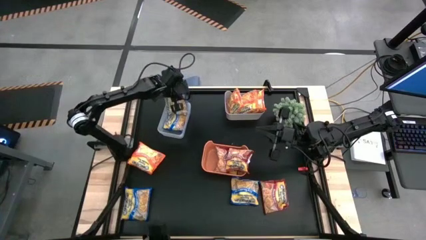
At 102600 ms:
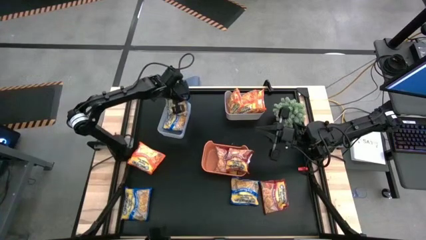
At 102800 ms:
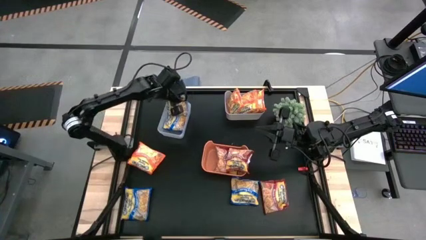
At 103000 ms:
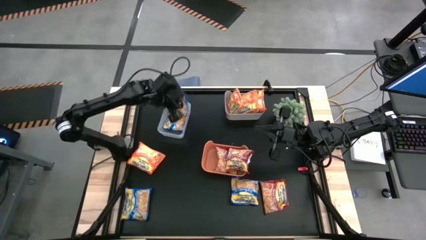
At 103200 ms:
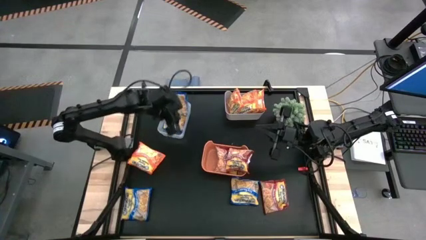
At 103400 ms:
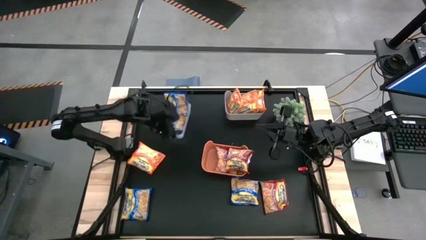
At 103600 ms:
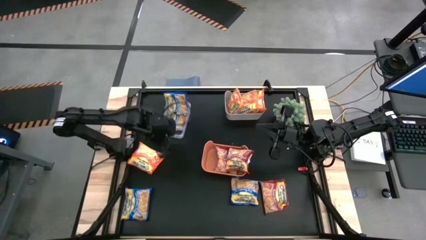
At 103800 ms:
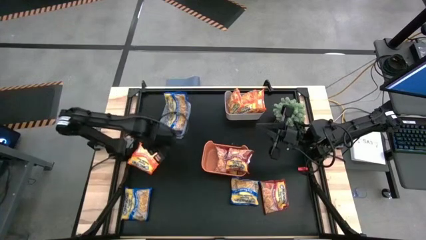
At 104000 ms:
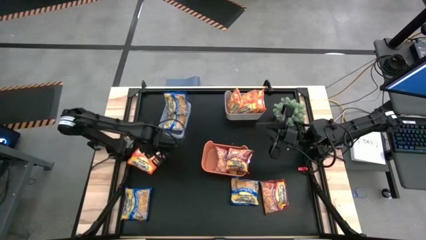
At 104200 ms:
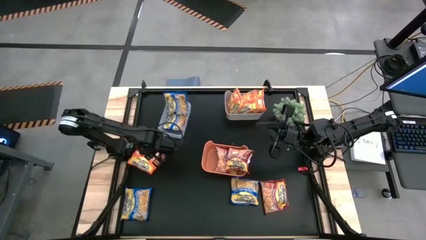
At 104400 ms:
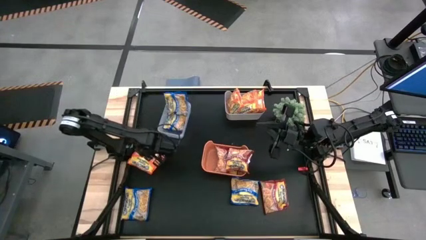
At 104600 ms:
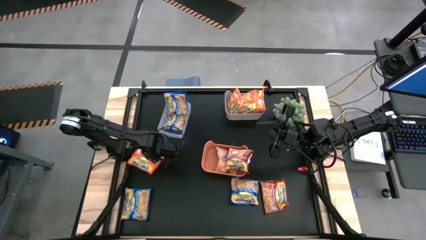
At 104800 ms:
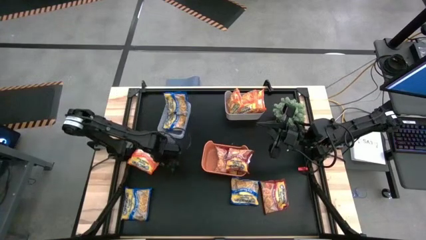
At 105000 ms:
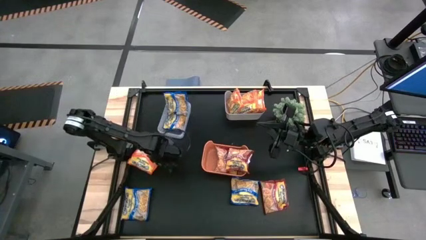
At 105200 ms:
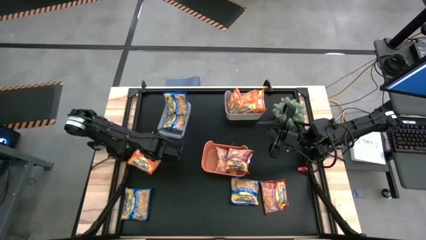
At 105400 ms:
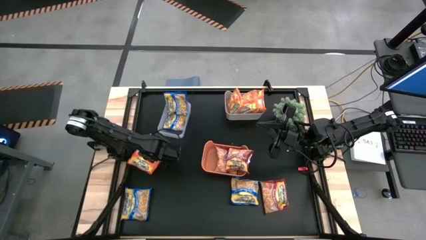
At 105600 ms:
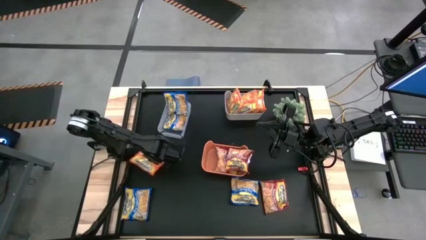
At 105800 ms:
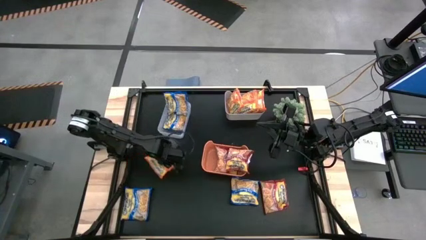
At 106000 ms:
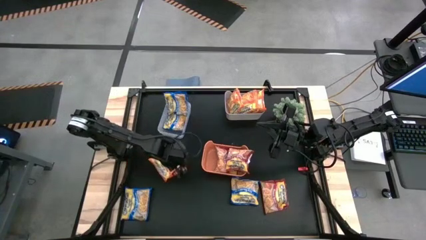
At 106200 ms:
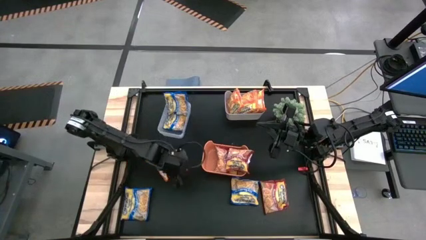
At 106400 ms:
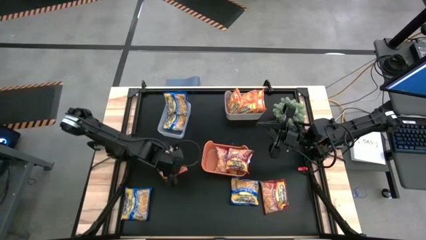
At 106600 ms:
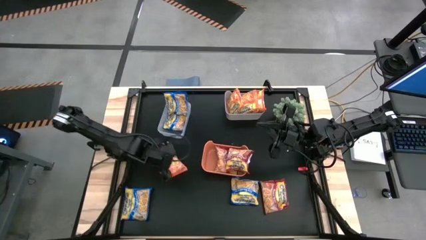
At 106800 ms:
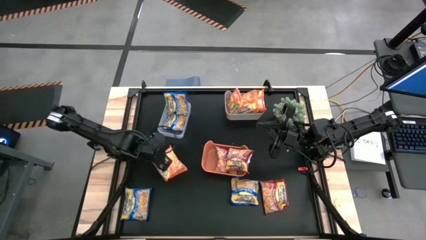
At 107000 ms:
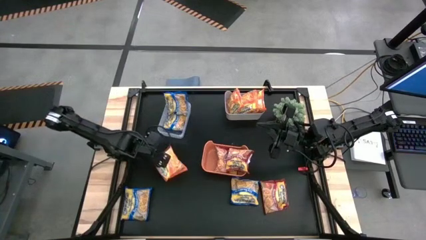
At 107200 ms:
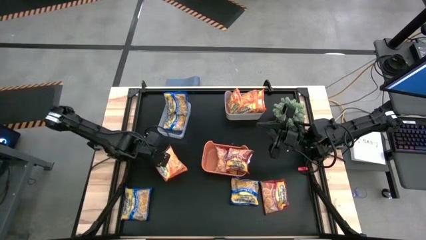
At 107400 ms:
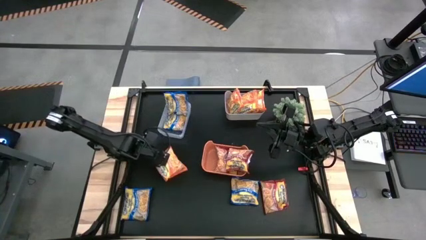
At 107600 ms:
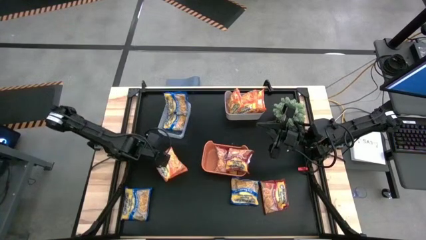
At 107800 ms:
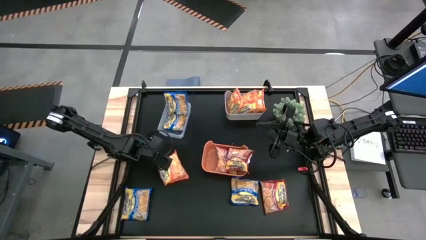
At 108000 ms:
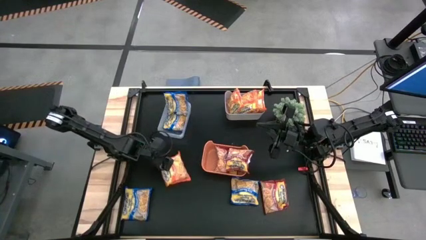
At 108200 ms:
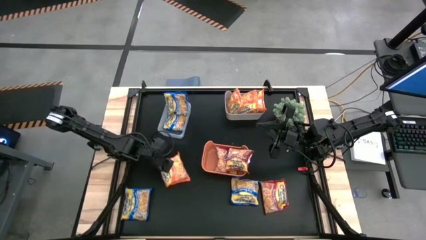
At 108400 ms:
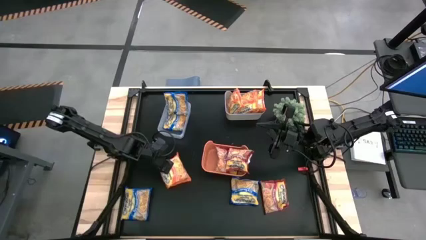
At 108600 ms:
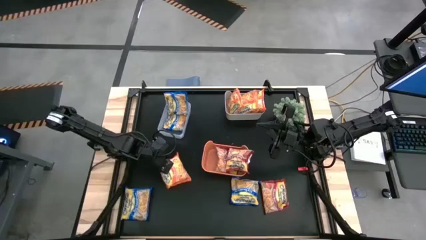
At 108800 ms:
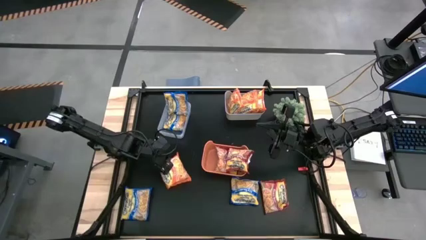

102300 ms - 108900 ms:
Task: Sort Maruchan noodles
Put the orange noodle packet into the white bin

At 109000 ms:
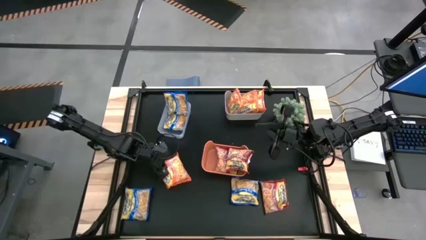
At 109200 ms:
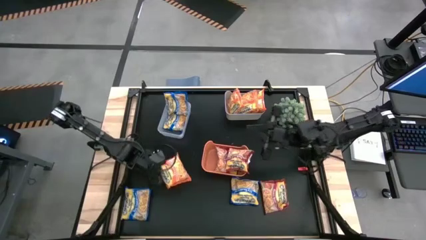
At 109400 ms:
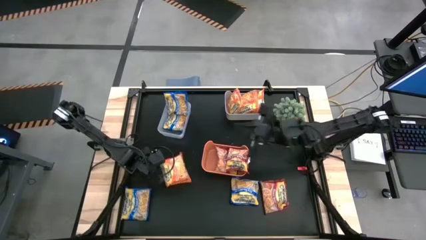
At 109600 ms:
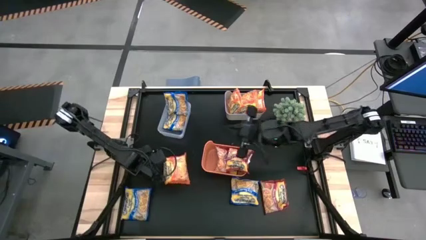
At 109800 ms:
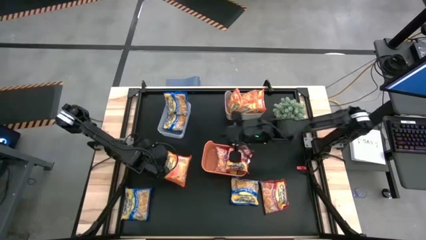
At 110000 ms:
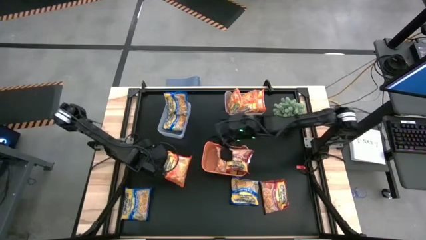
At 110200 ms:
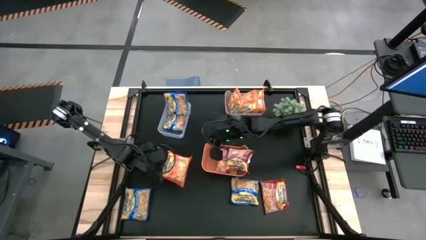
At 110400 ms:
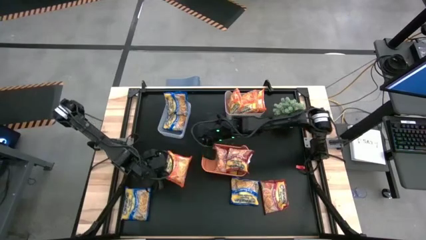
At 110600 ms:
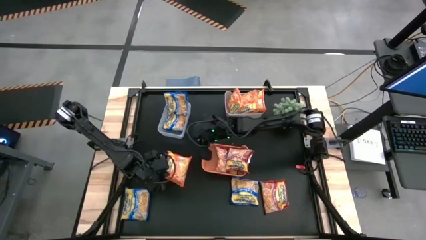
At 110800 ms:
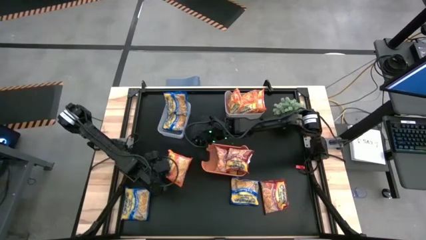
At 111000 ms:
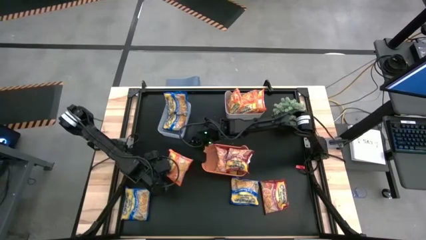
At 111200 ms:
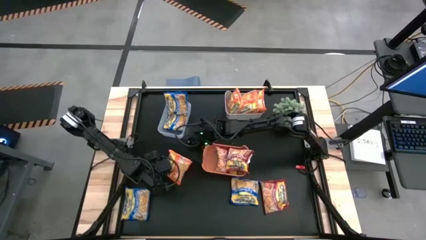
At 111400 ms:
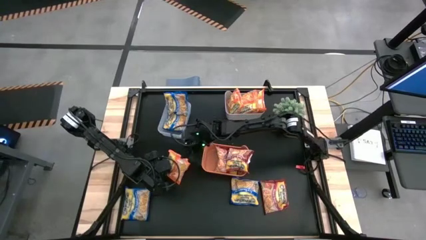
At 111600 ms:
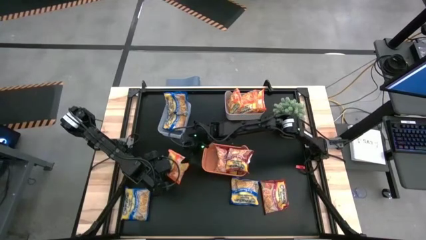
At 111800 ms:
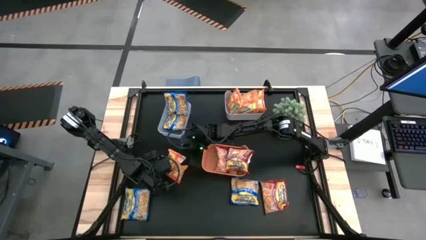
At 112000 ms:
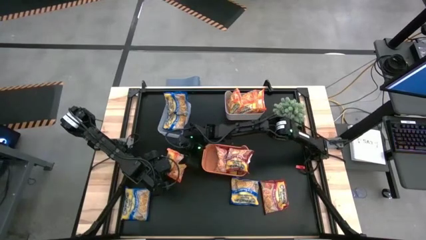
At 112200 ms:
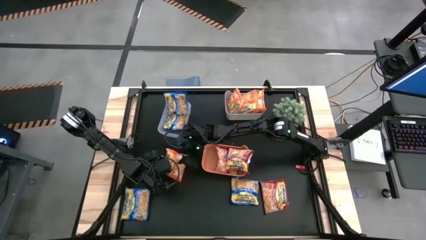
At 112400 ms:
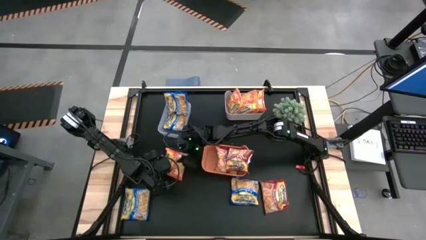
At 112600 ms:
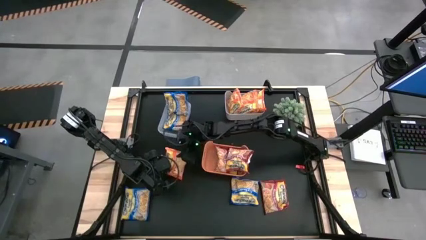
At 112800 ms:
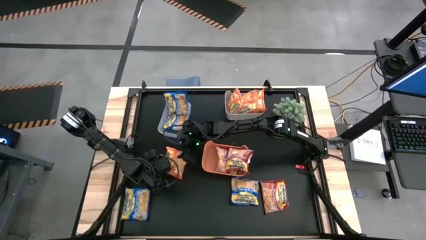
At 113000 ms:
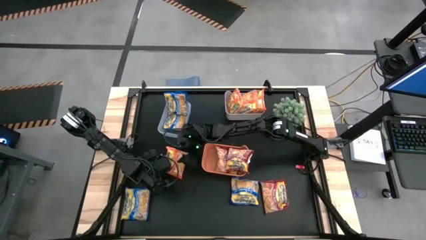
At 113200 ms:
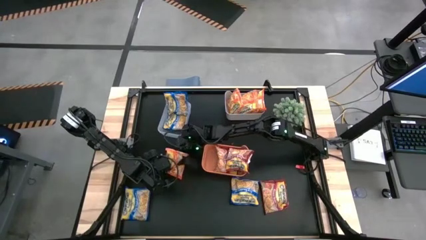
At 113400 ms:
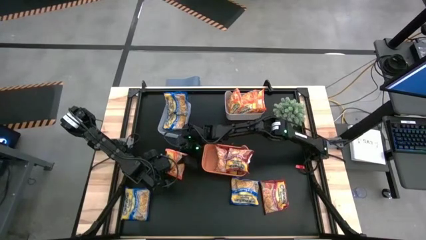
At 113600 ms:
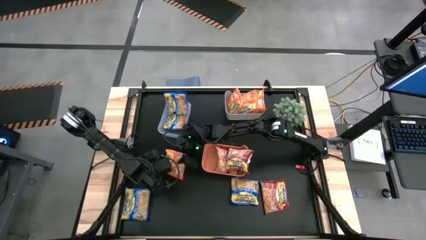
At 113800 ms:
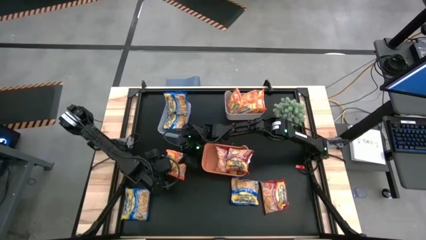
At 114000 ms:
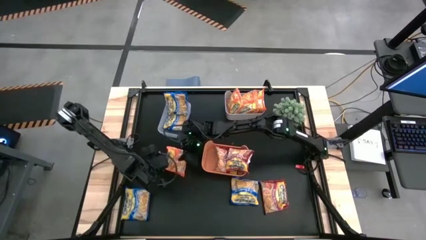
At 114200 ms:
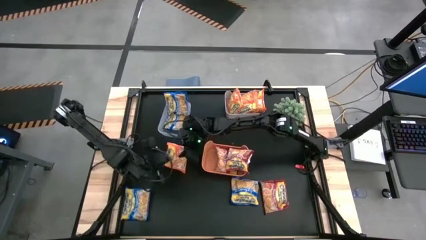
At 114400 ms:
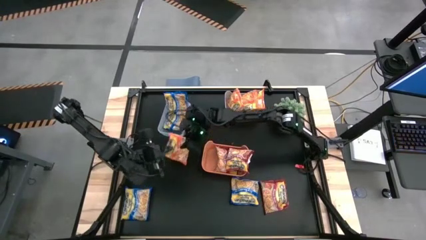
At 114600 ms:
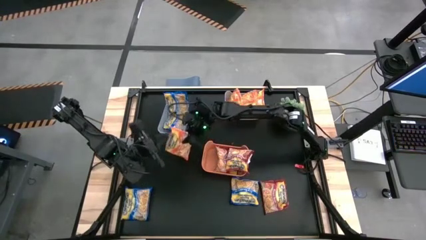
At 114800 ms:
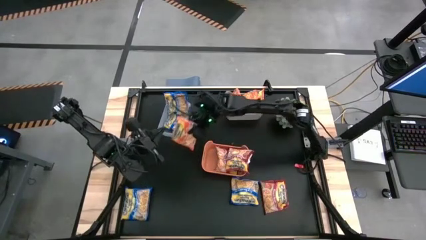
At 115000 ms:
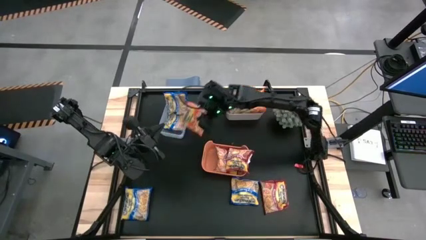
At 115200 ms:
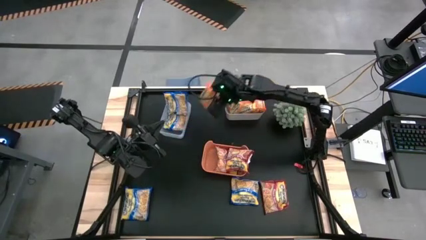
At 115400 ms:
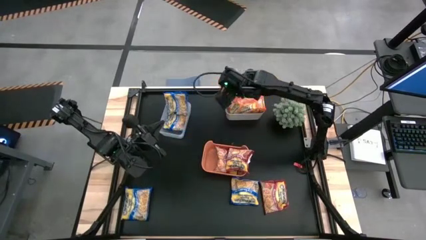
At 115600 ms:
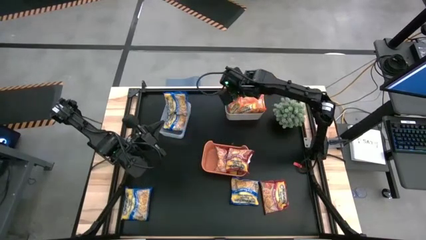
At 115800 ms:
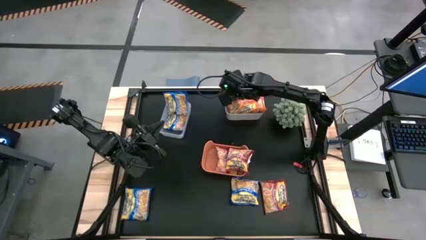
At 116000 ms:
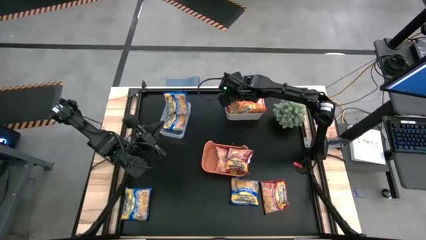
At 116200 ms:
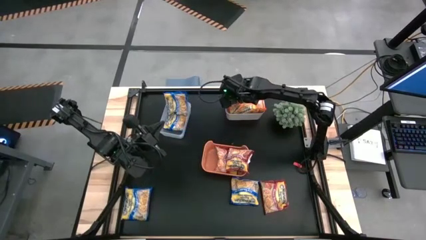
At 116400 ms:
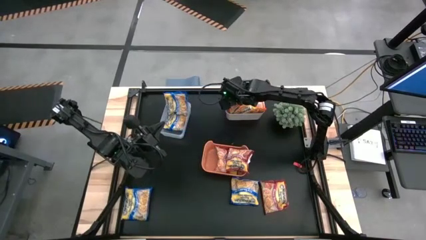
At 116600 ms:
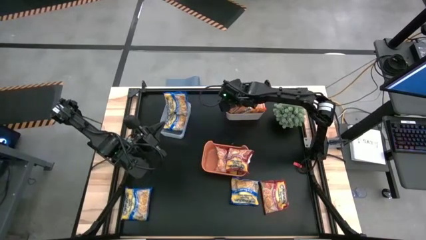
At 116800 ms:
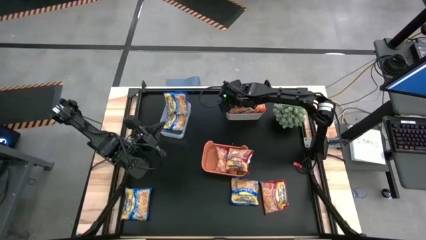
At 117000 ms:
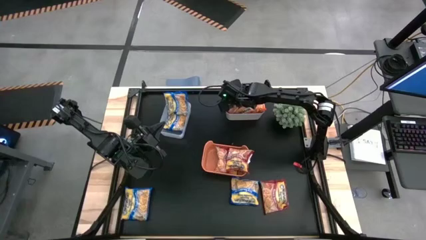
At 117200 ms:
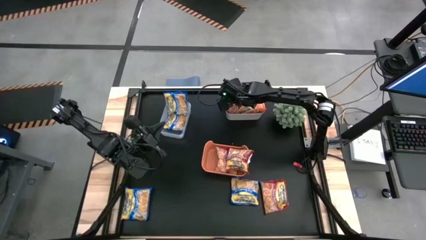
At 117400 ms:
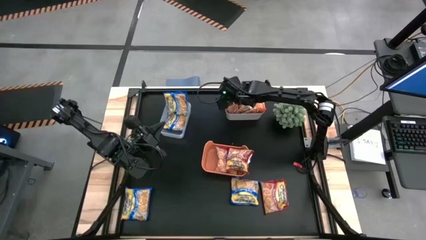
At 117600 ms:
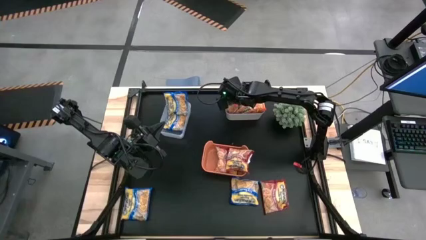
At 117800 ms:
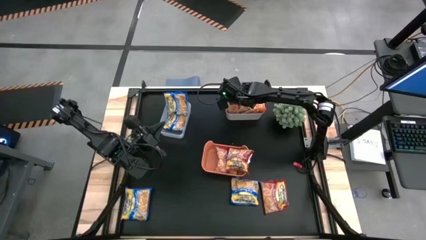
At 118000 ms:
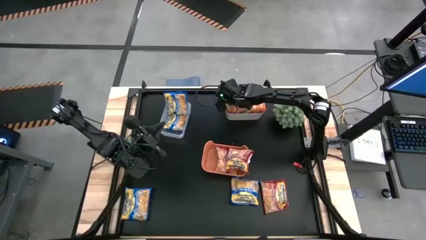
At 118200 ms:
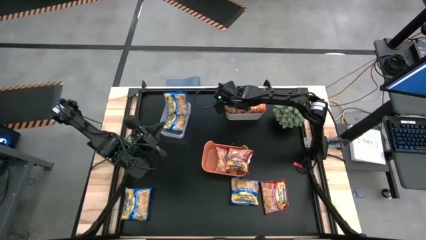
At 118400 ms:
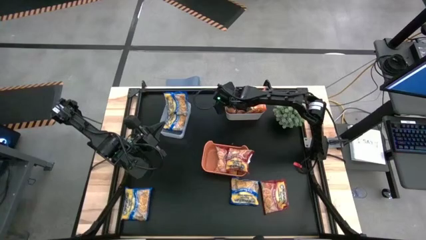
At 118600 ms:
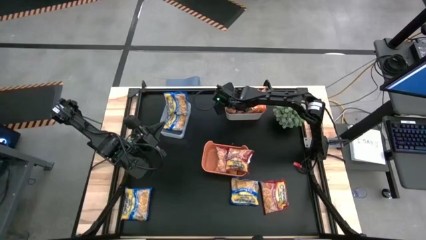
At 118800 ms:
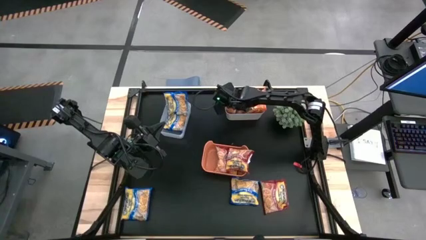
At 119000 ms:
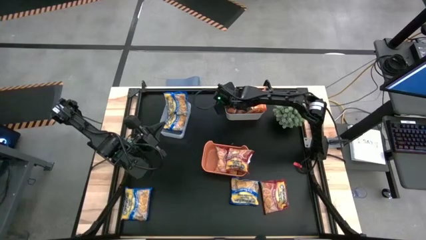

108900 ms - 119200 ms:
Put the orange noodle packet into the white bin
